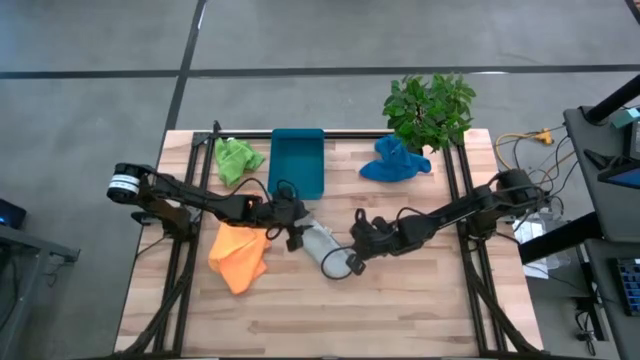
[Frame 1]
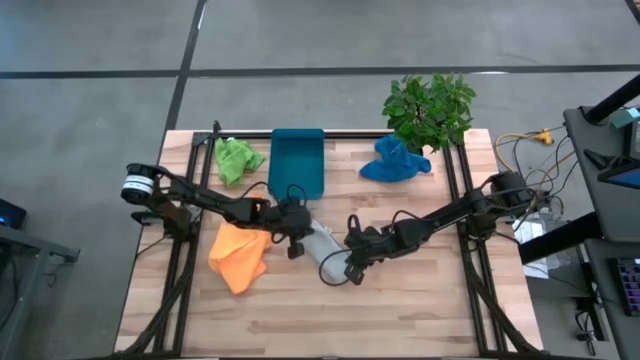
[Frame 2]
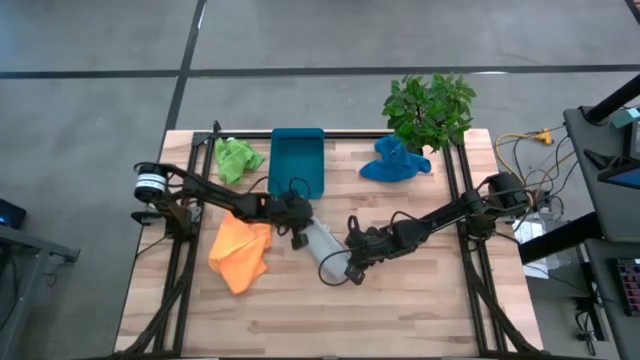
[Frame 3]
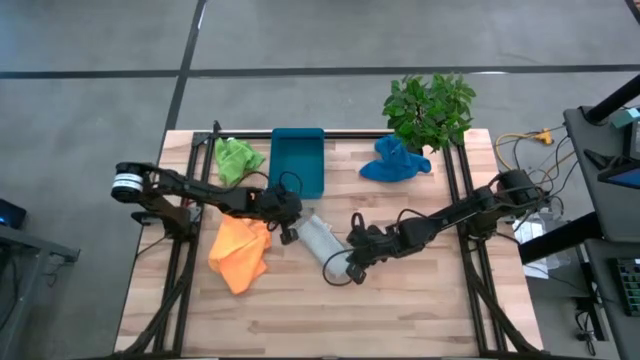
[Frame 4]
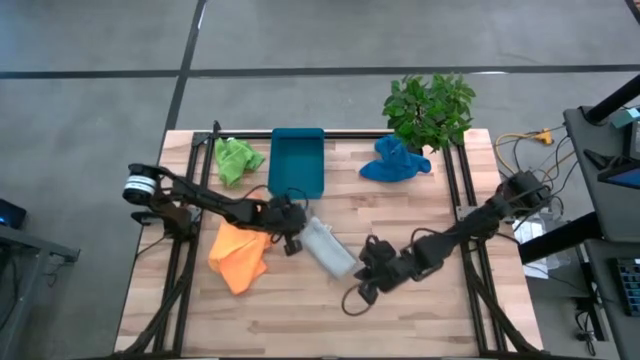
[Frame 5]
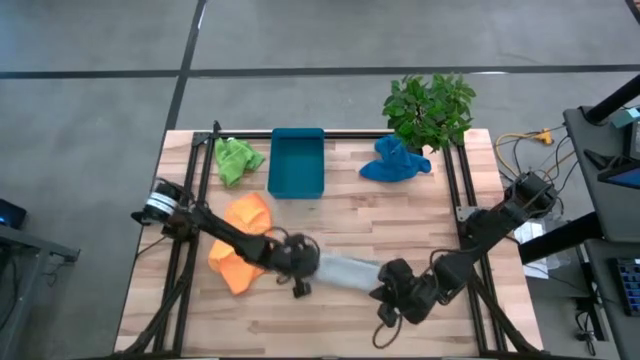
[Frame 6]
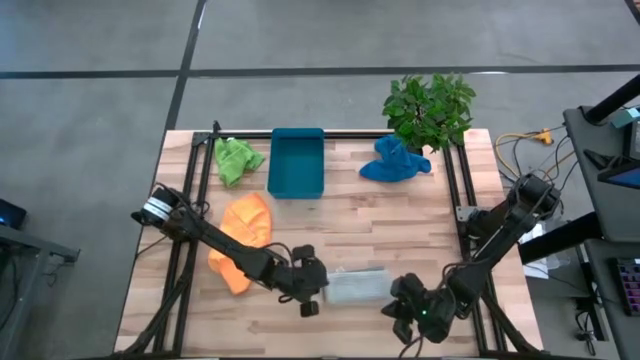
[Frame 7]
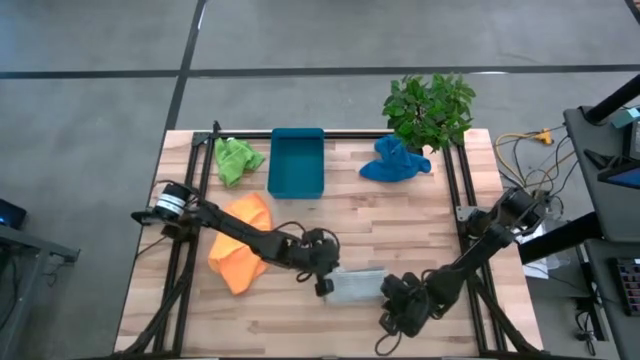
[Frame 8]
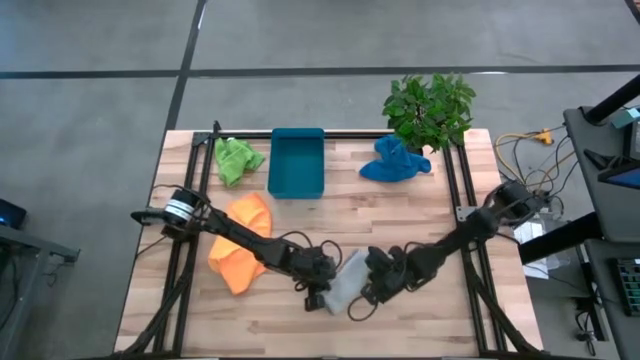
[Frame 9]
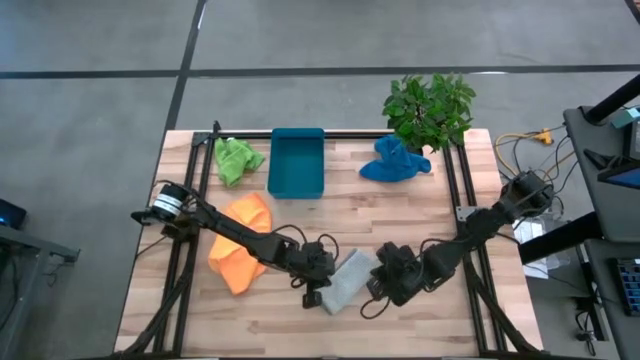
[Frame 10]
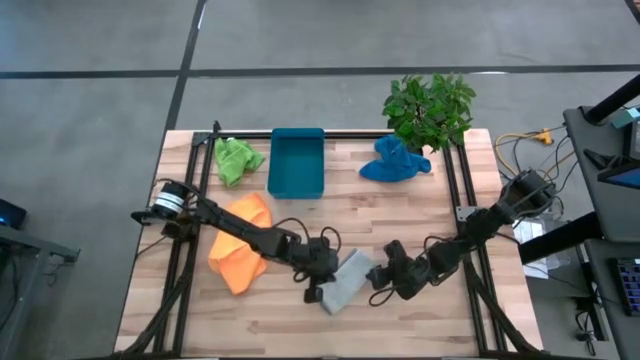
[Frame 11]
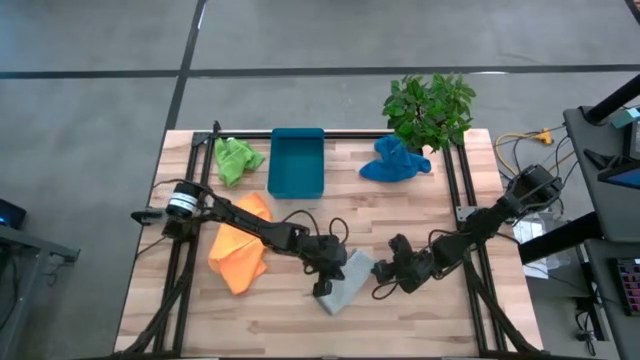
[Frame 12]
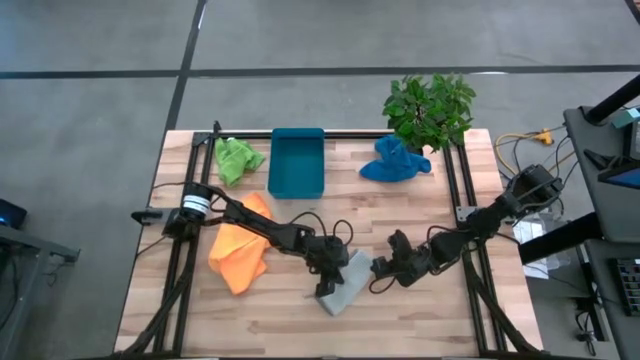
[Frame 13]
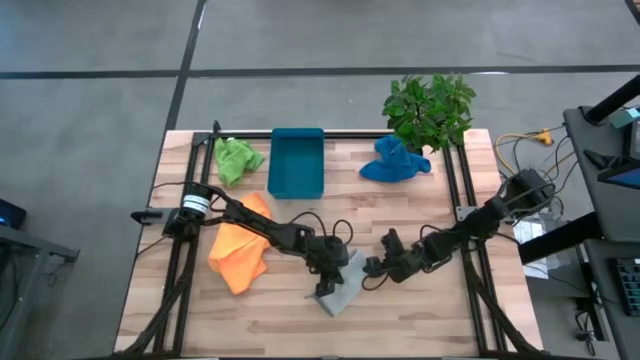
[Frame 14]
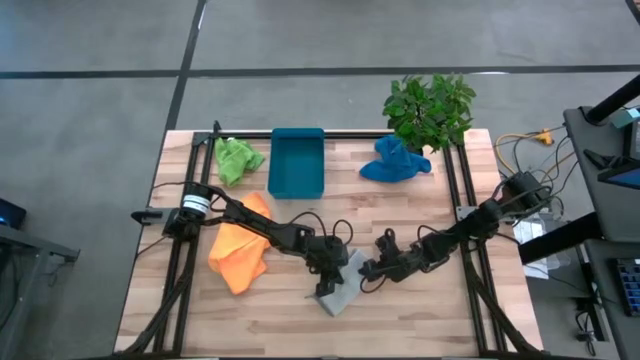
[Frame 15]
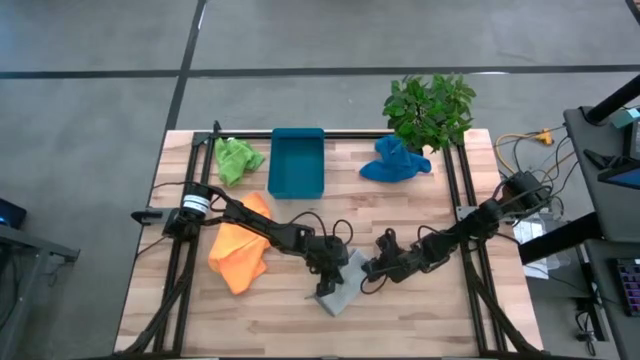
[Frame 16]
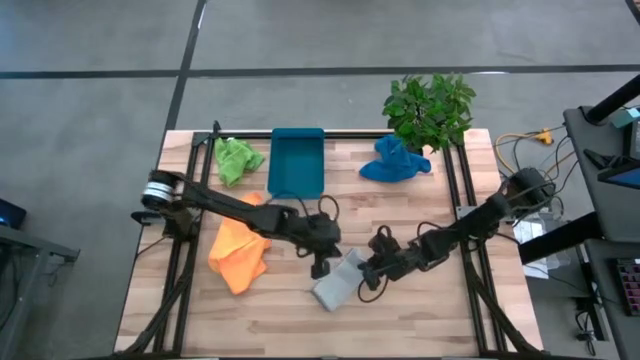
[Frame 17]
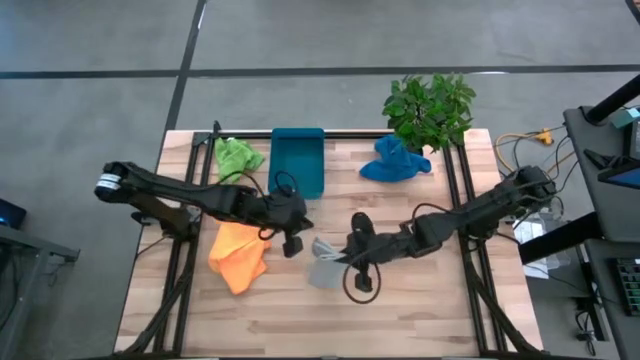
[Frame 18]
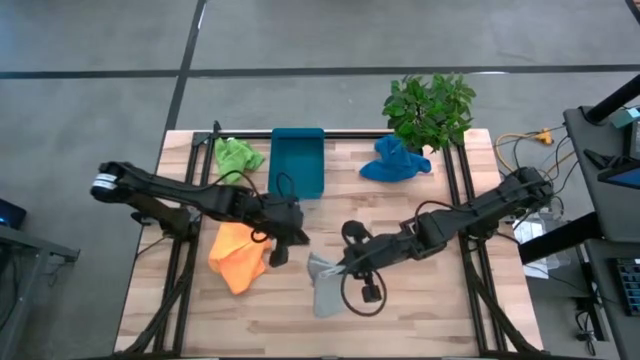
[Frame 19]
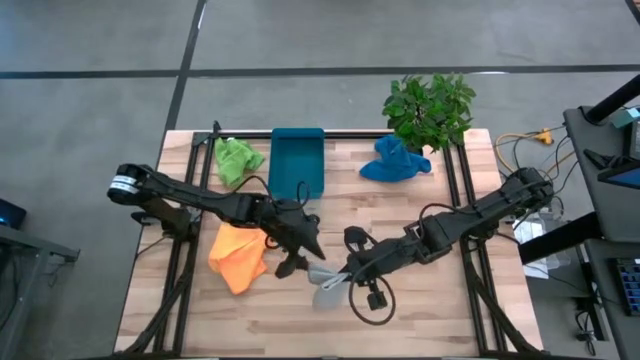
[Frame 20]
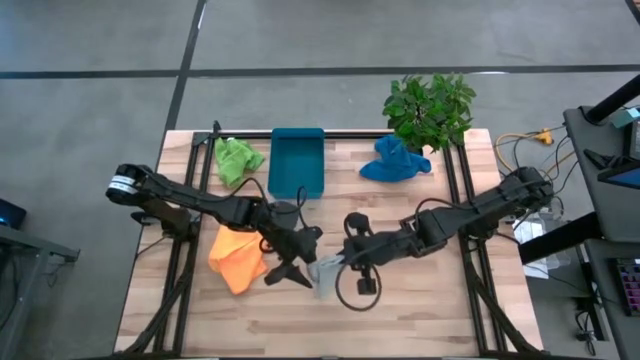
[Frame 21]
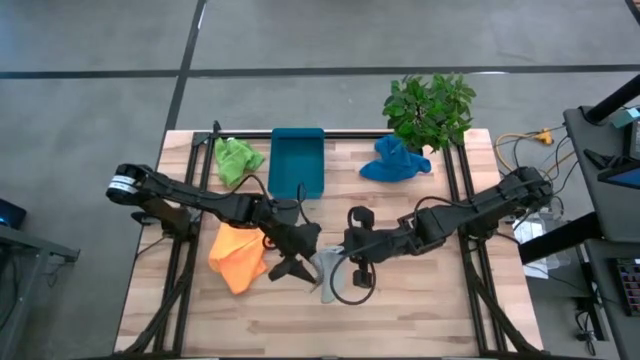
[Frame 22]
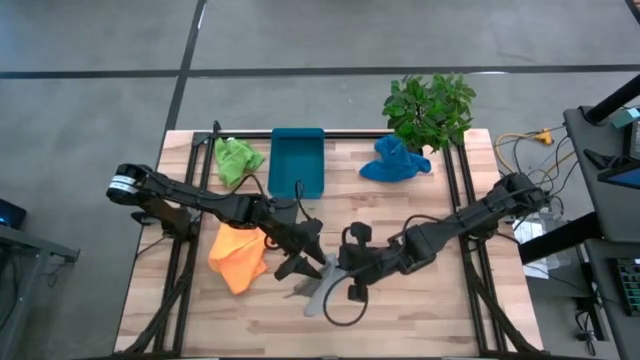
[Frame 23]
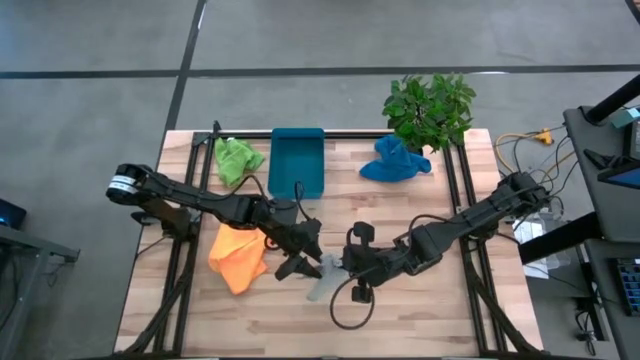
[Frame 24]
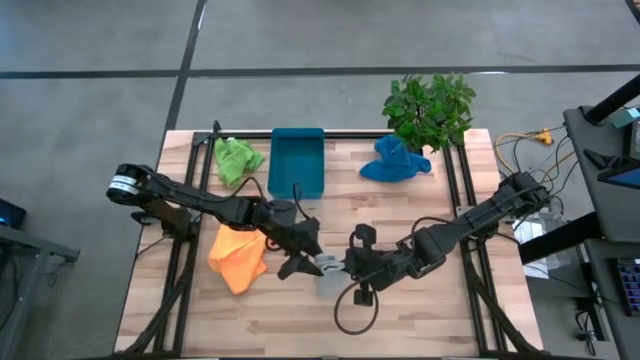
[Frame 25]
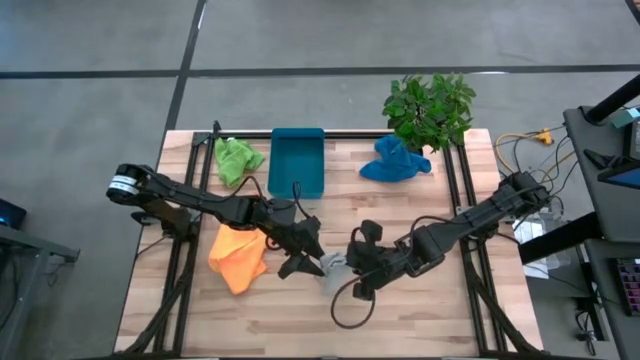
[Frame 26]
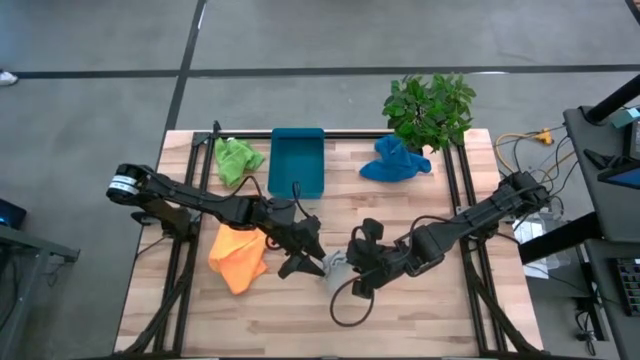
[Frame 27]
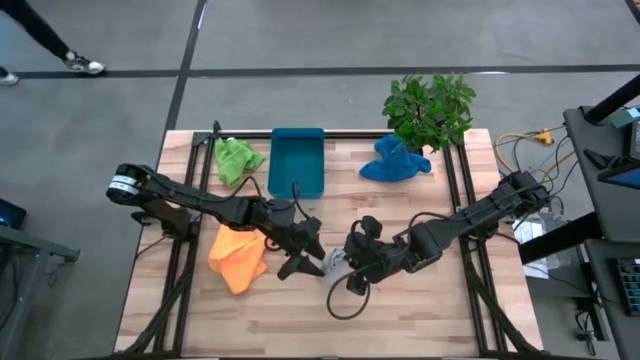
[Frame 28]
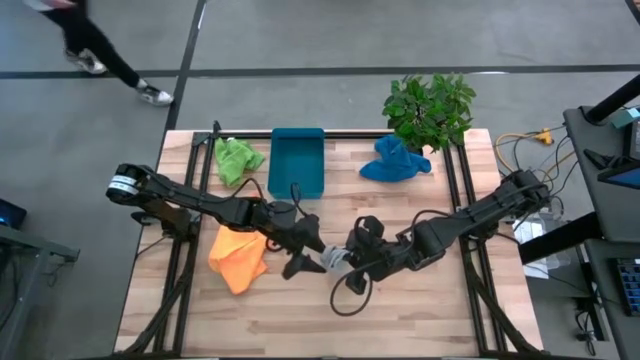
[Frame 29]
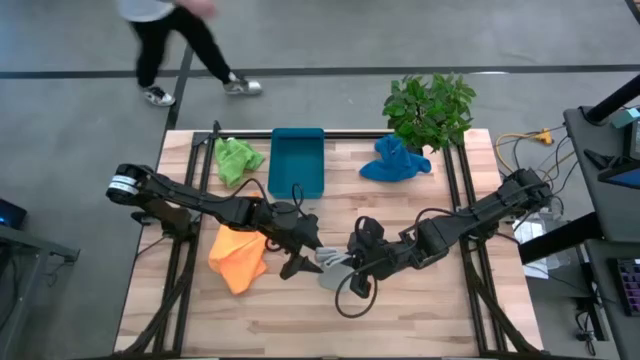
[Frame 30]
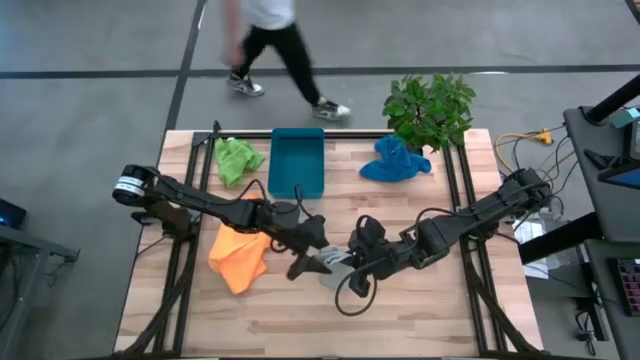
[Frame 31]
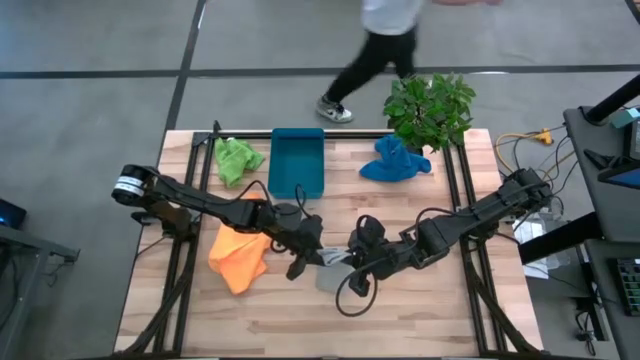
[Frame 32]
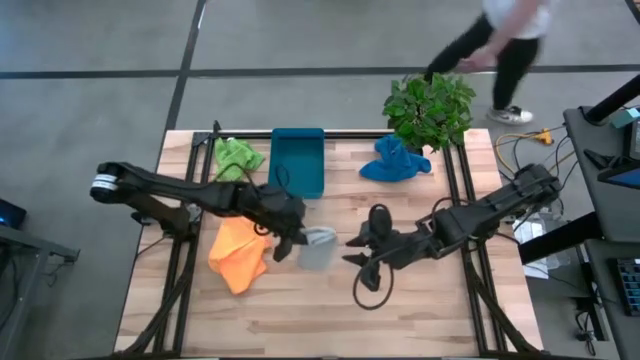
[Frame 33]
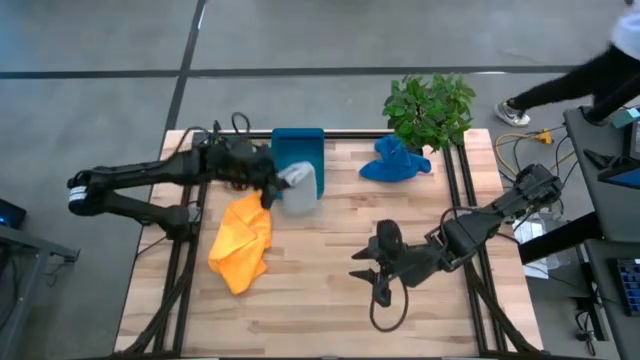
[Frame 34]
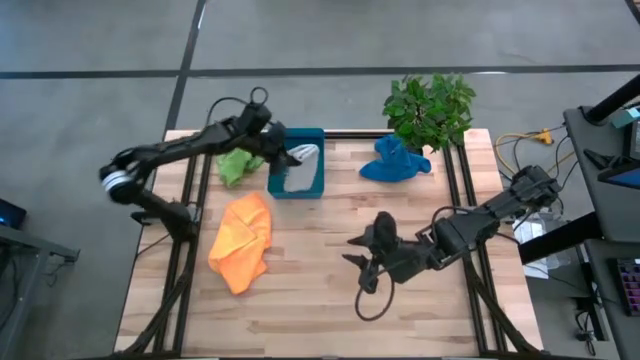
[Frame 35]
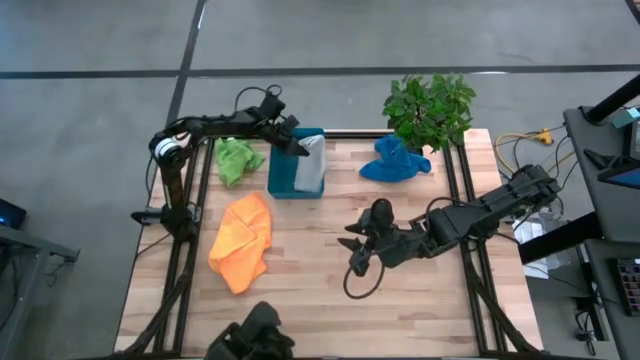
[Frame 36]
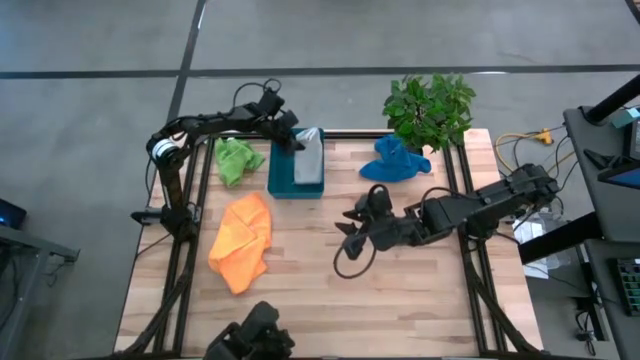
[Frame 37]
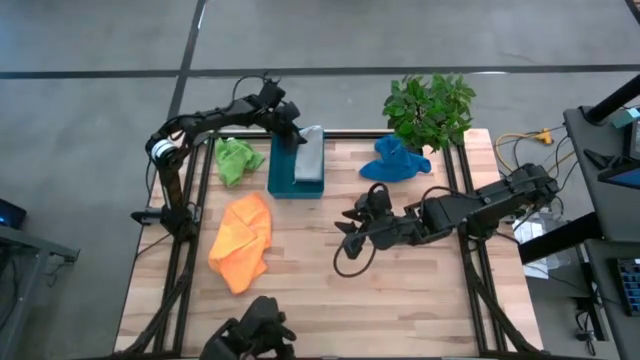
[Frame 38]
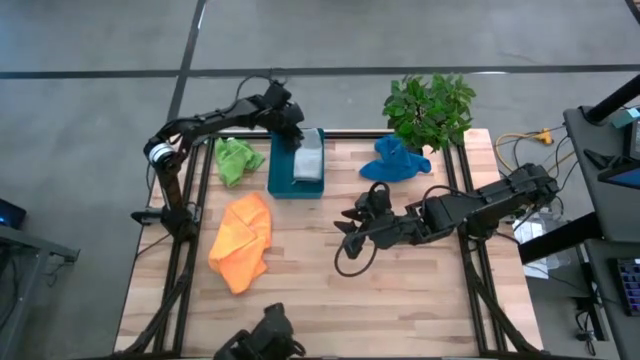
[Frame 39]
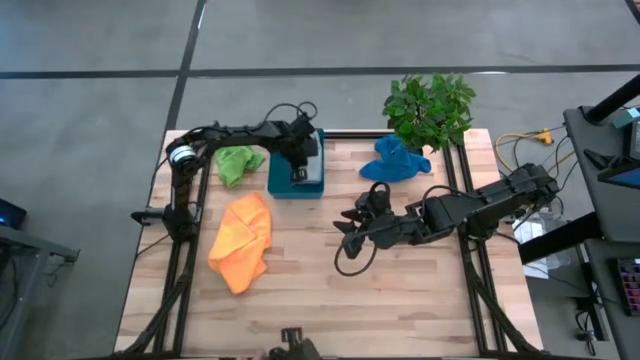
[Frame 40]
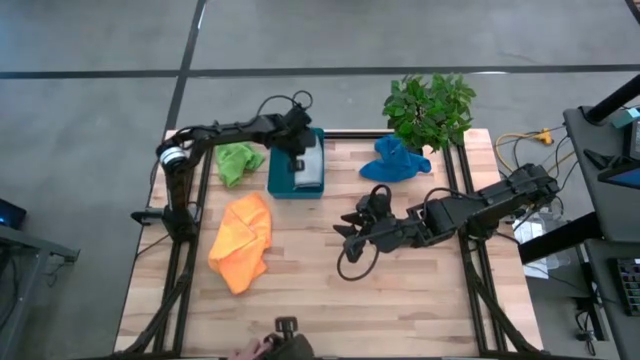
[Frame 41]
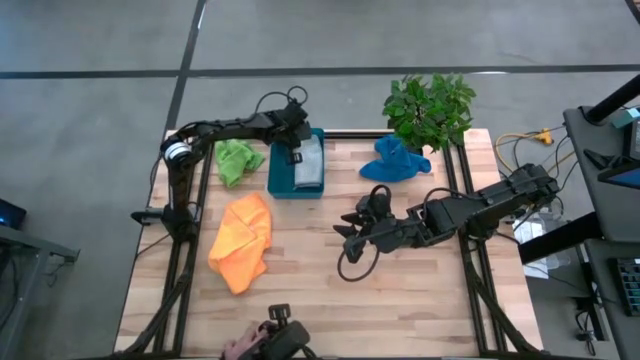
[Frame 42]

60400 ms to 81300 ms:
Task: Fold microfiber towels
Put the grey microfiber cloth into the blue bin

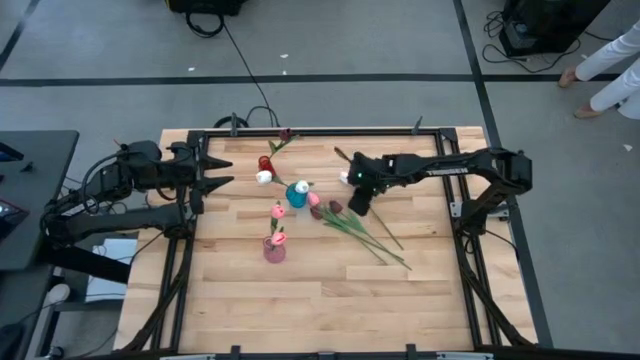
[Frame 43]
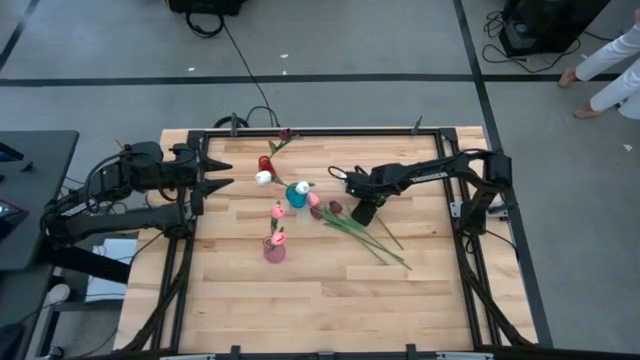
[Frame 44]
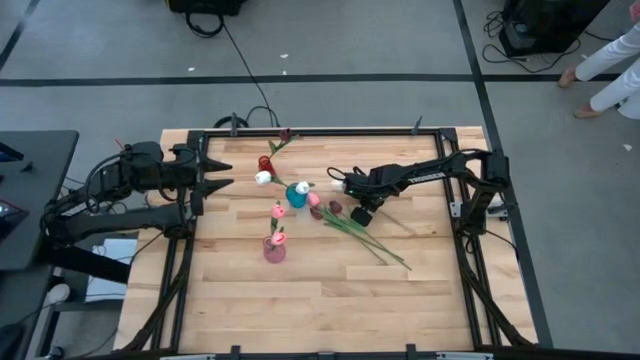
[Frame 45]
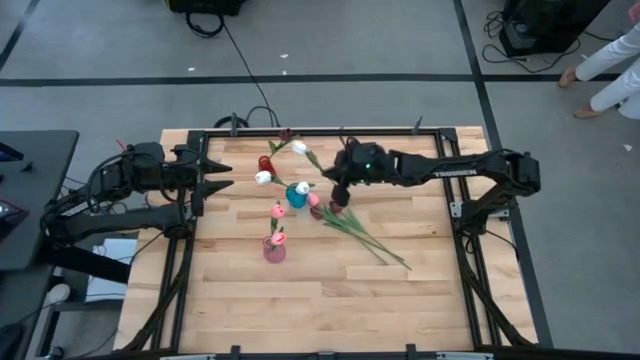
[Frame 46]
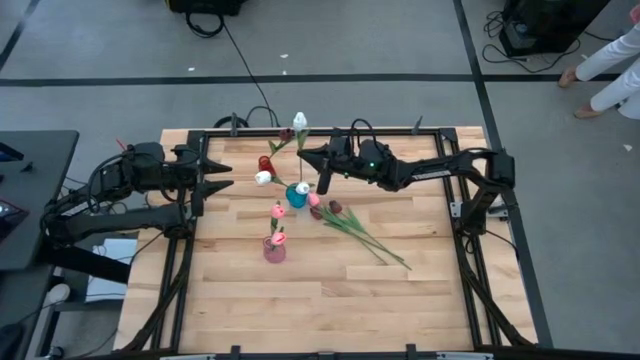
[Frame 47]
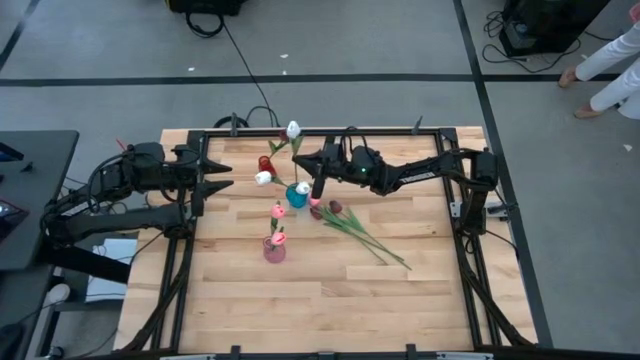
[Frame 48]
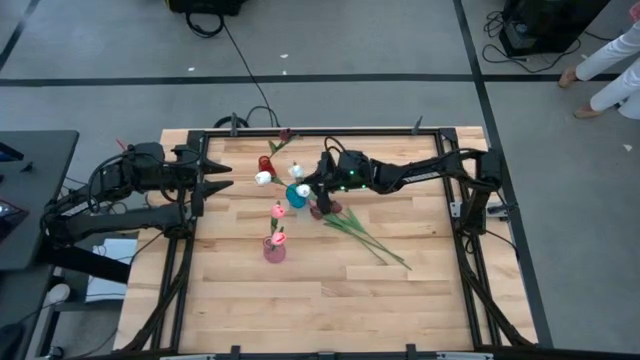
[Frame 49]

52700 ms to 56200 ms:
Task: Sort flowers into vase by color
Put the white flower into the blue vase
